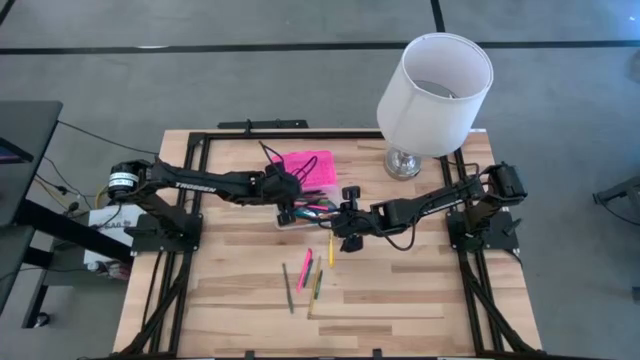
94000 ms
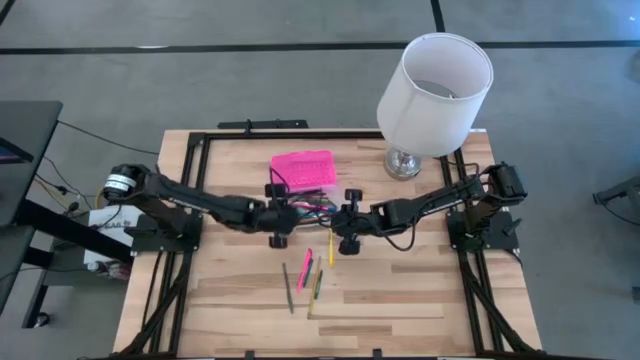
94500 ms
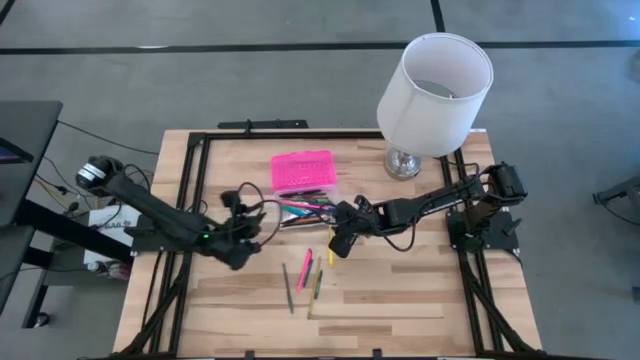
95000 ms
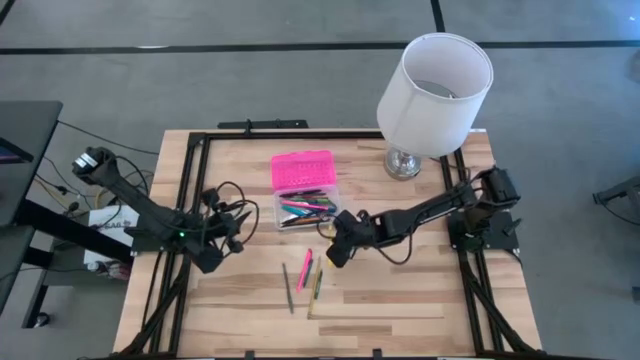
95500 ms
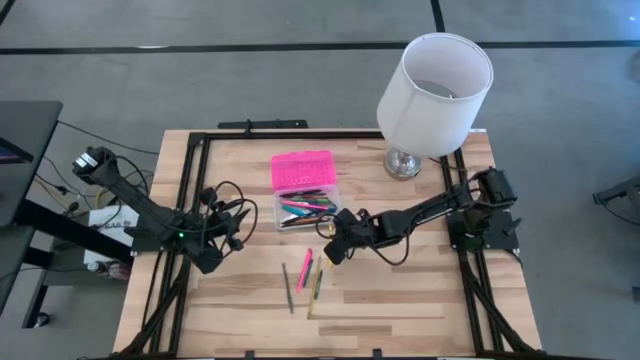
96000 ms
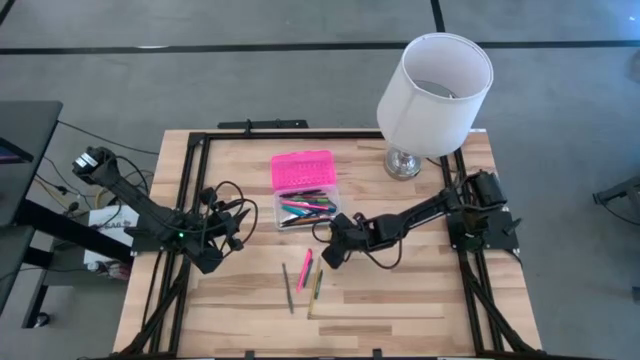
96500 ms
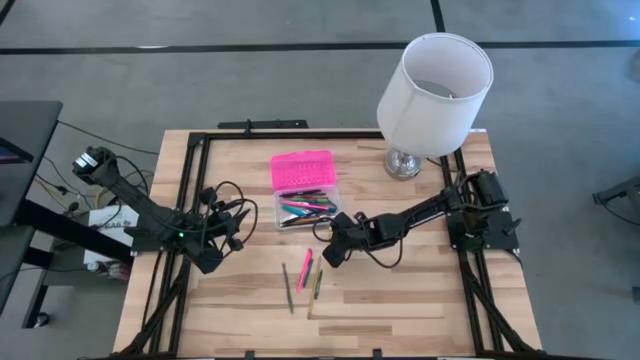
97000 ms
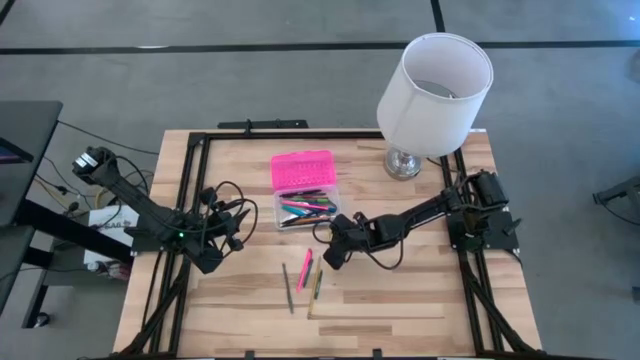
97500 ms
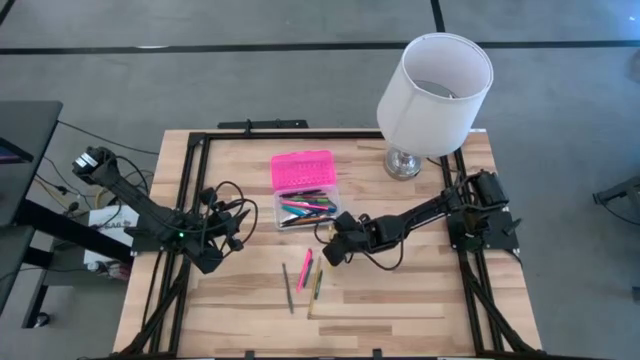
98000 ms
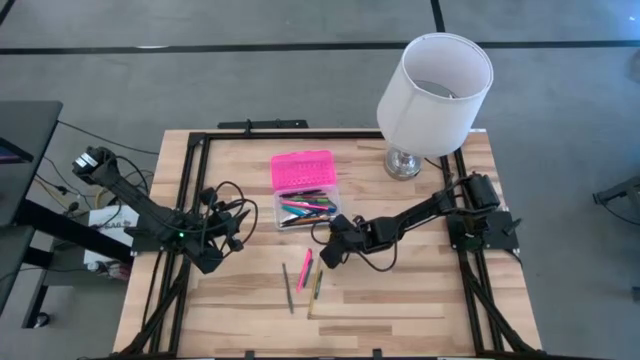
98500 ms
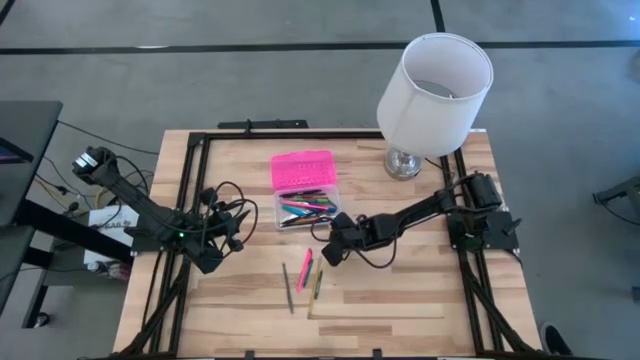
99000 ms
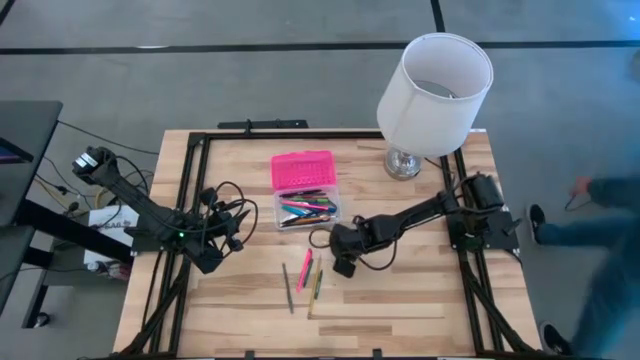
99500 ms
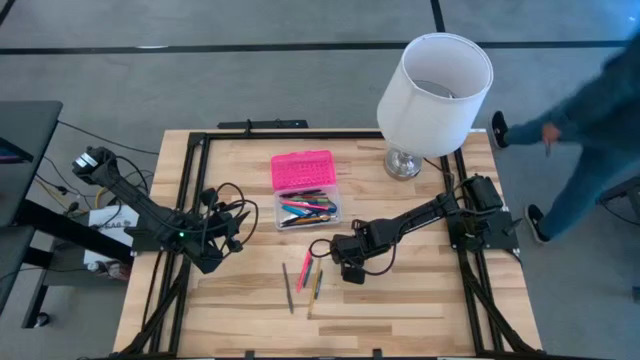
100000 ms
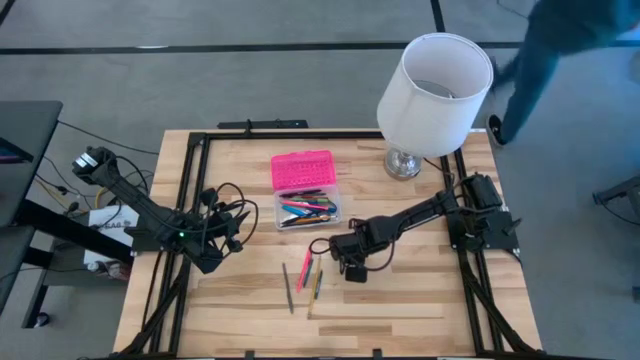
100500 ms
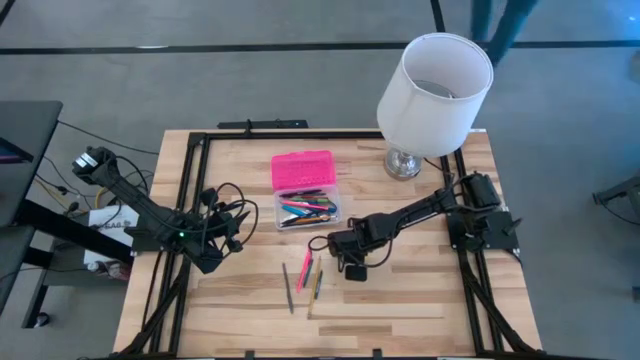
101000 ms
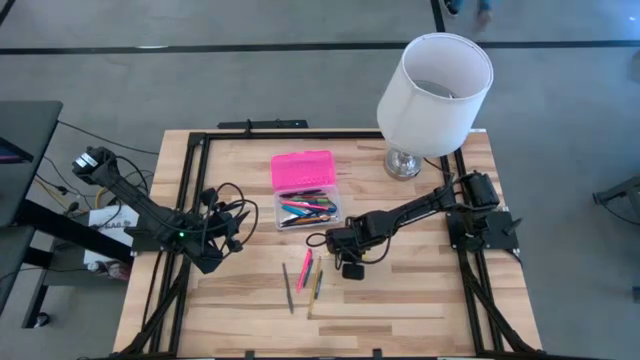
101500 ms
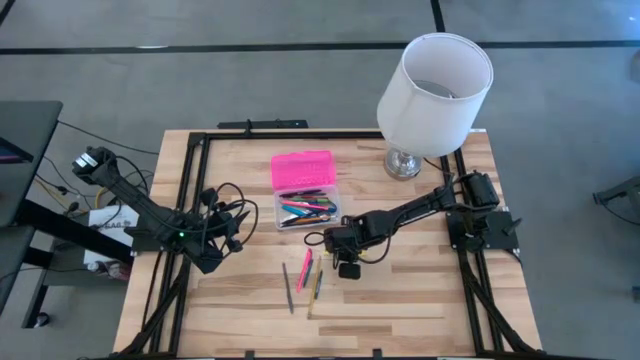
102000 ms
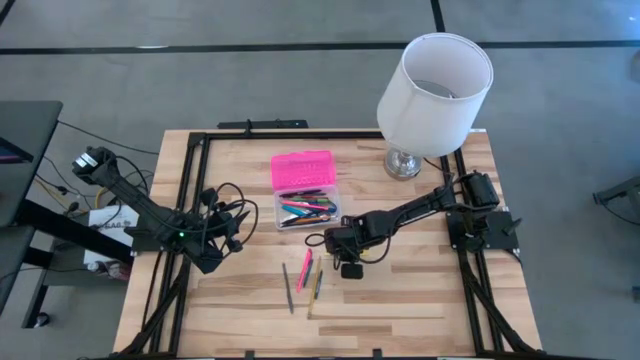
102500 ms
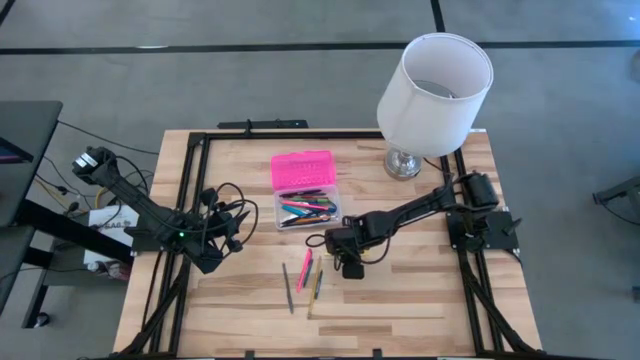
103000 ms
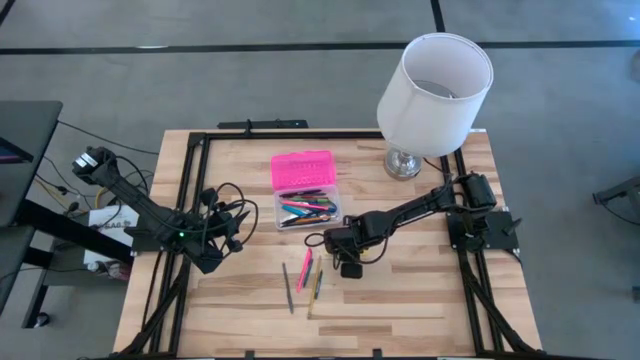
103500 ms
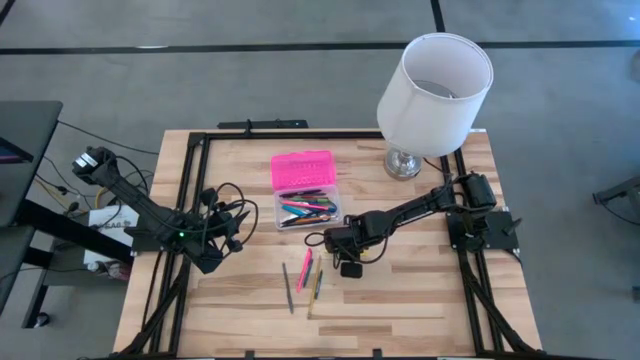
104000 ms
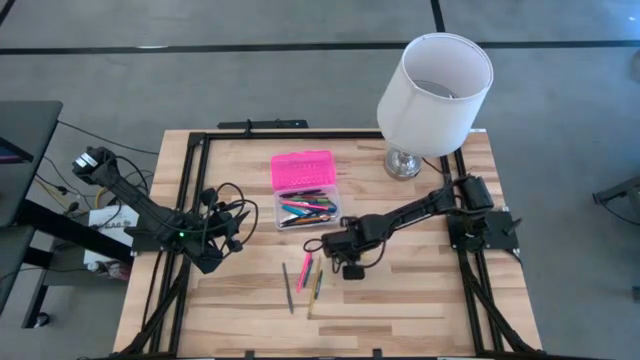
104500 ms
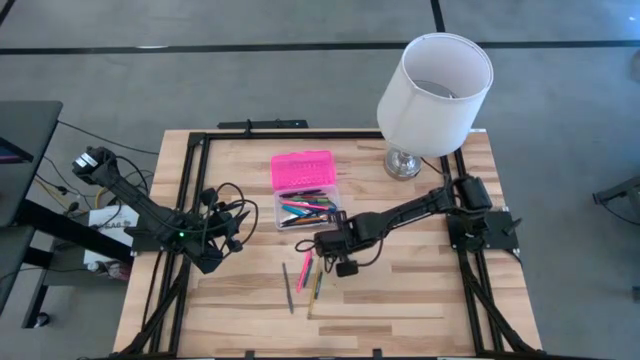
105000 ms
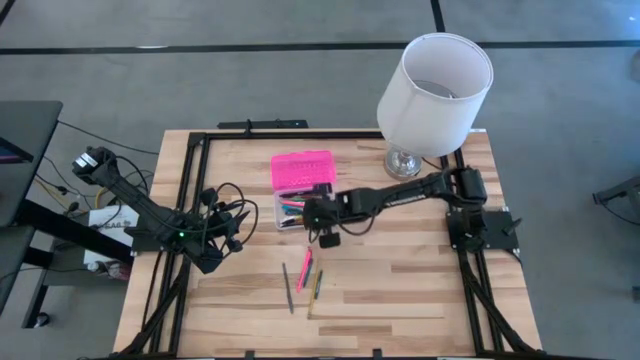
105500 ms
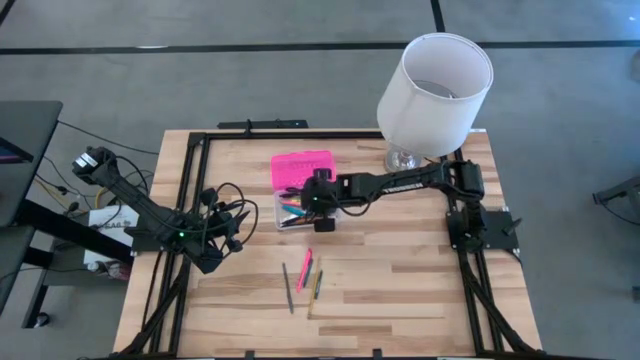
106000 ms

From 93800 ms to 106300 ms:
Task: Pick & place school supplies into a supply box
Put the yellow pen into the pink supply box

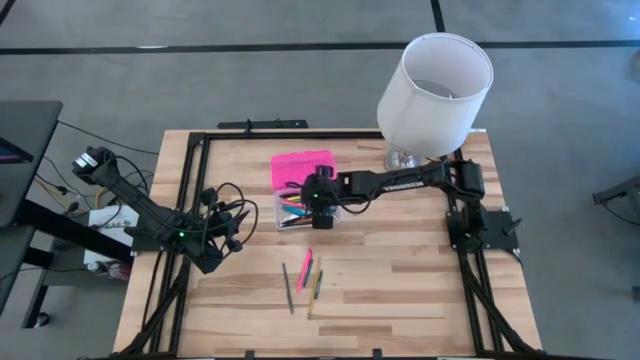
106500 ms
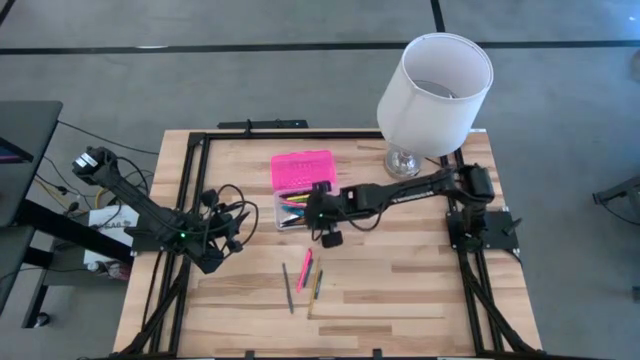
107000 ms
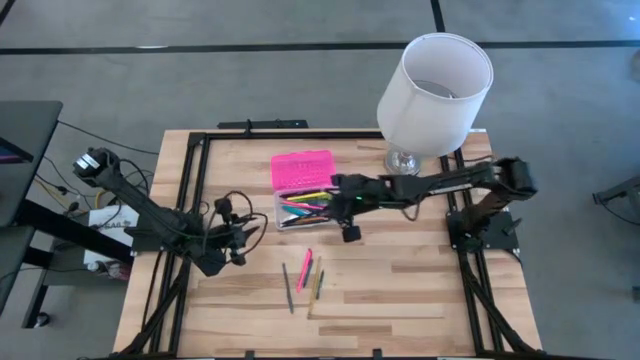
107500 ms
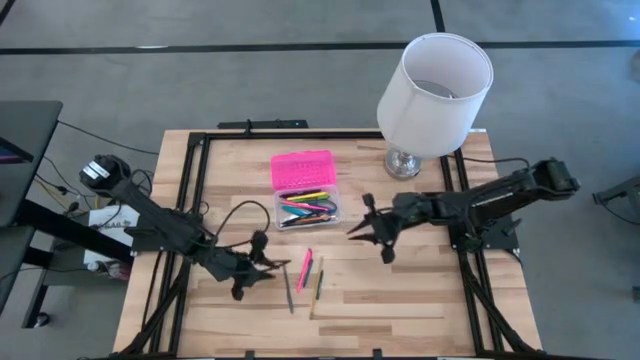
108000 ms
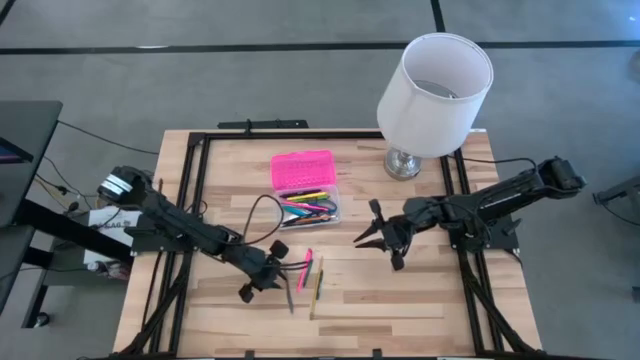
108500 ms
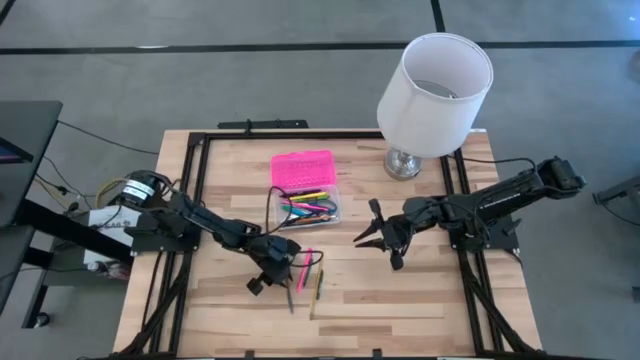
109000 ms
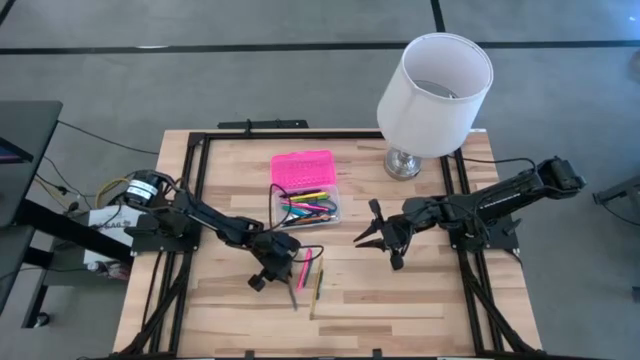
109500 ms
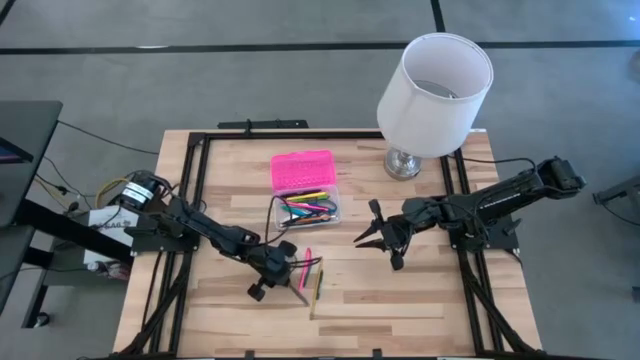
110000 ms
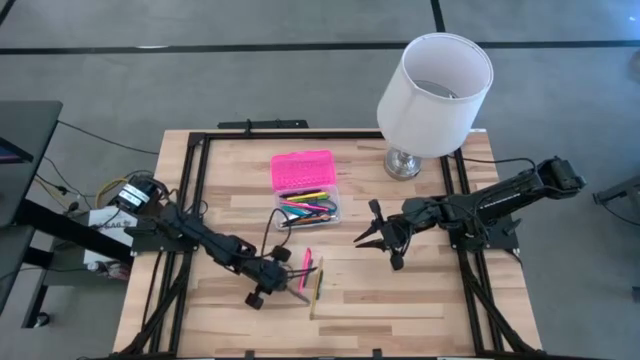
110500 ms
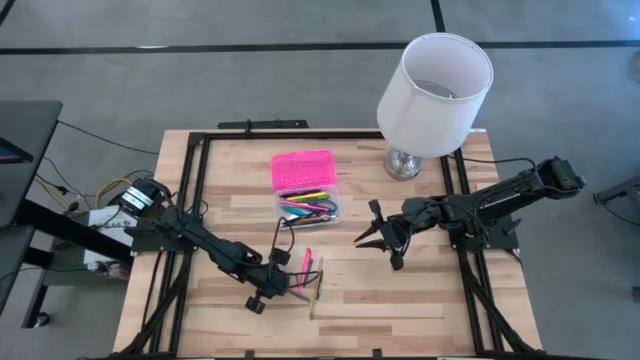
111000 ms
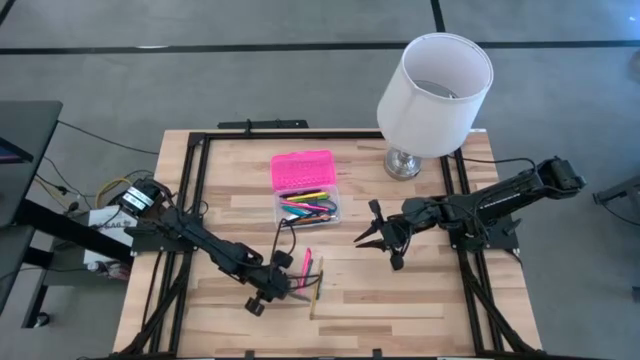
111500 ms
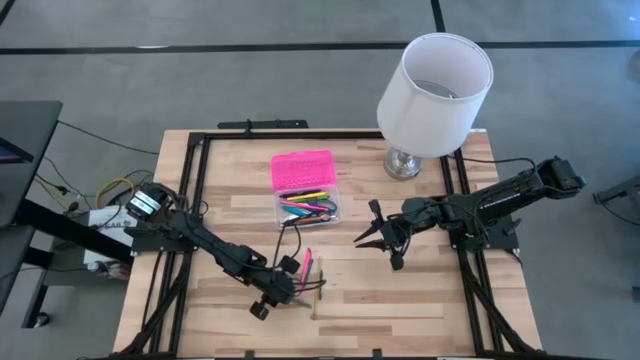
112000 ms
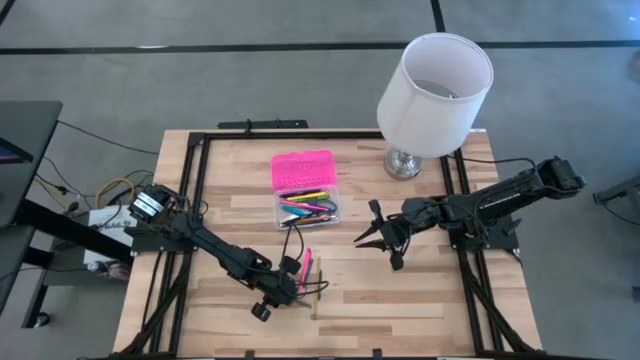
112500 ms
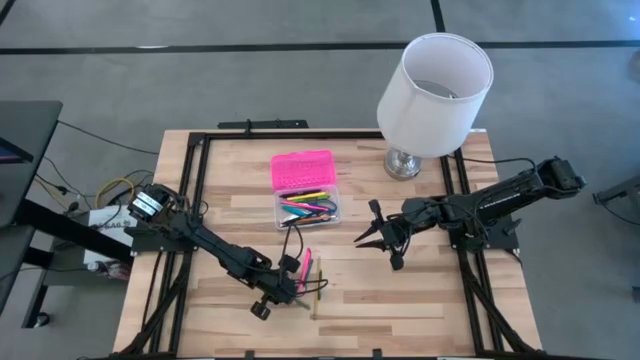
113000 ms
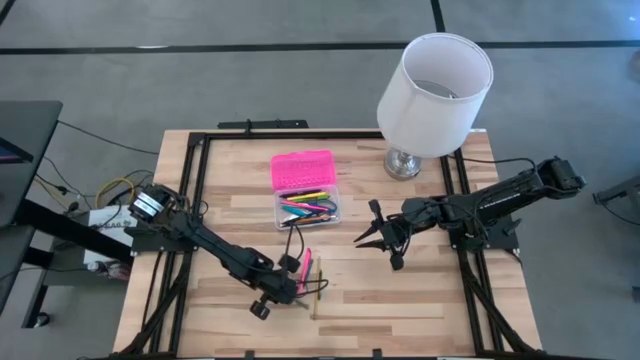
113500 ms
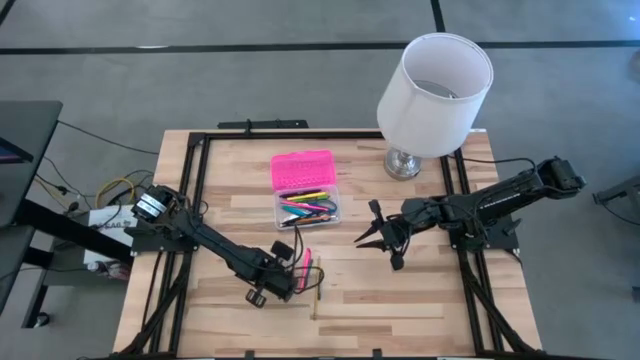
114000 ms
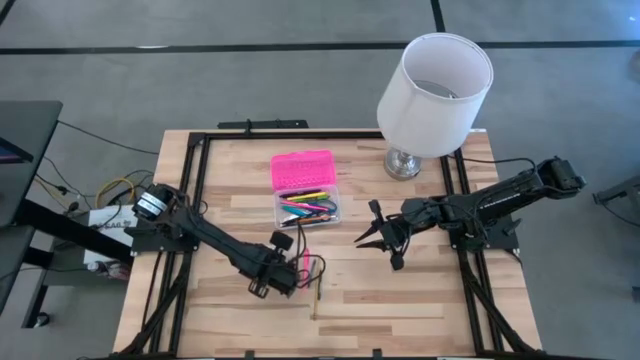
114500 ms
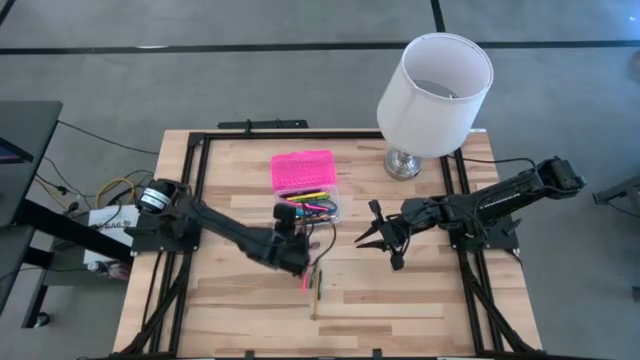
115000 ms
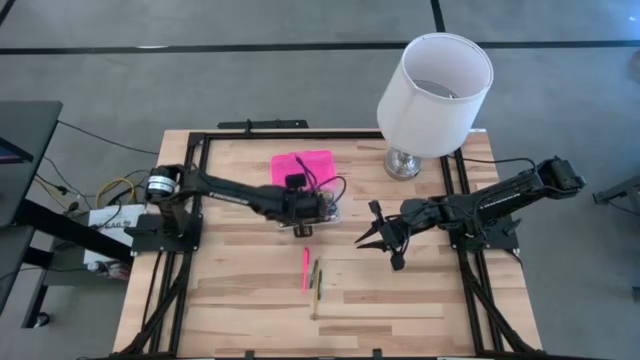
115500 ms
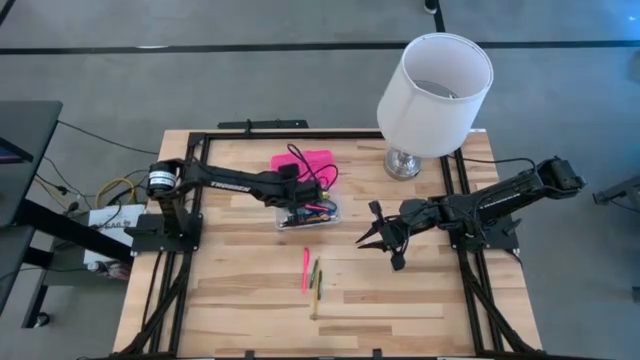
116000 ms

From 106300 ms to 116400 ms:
Put the gray pen into the pink supply box
